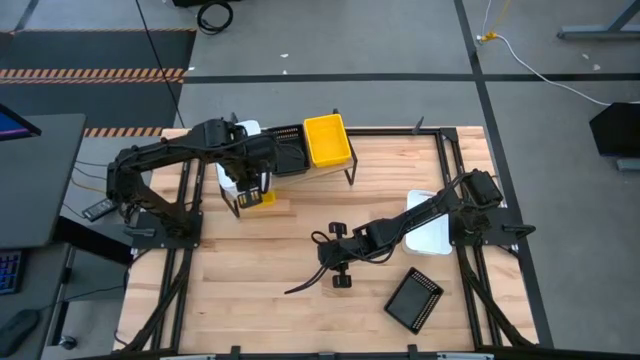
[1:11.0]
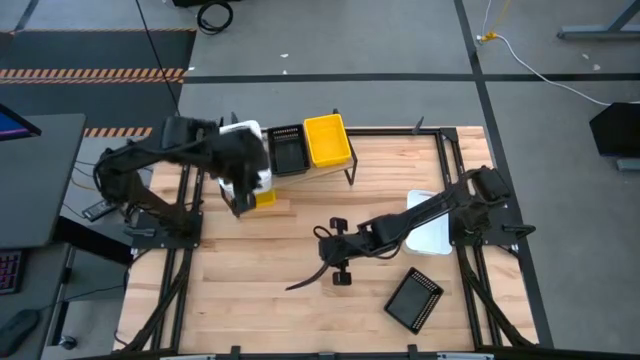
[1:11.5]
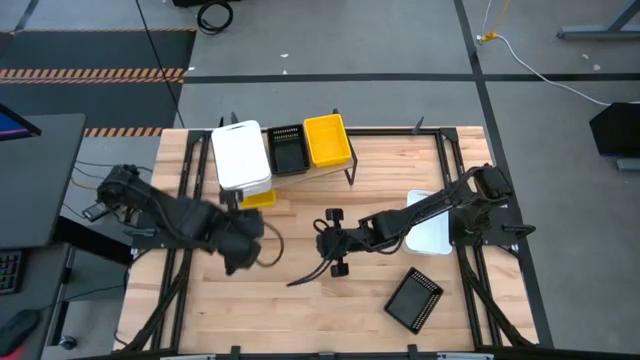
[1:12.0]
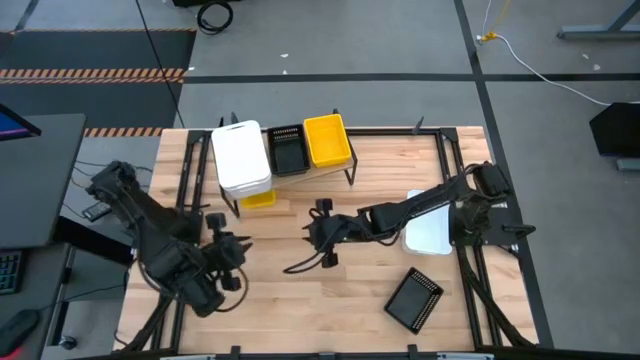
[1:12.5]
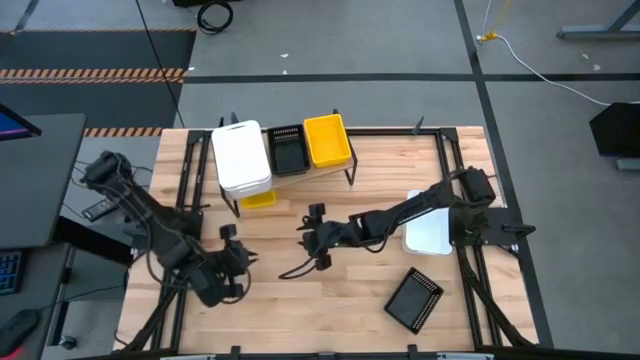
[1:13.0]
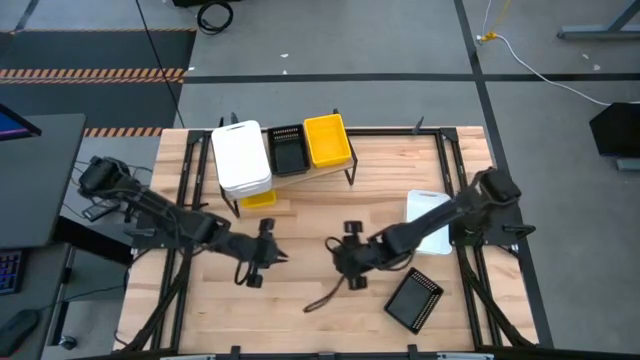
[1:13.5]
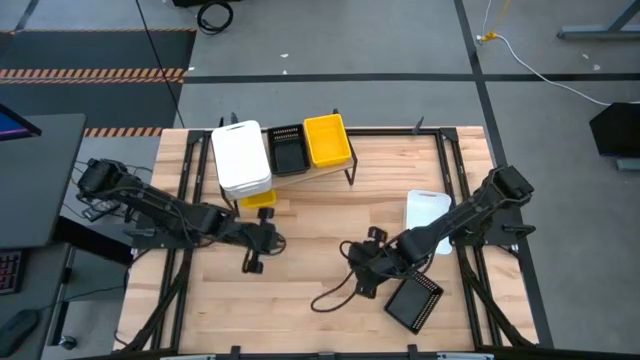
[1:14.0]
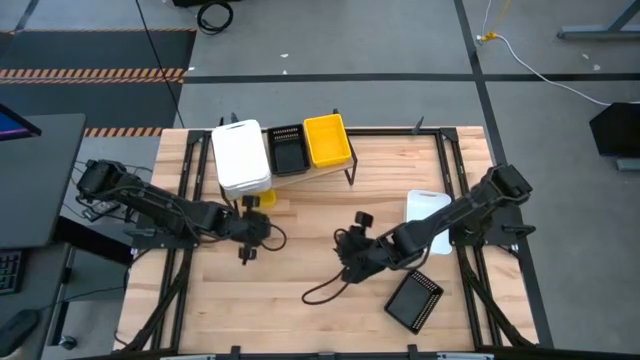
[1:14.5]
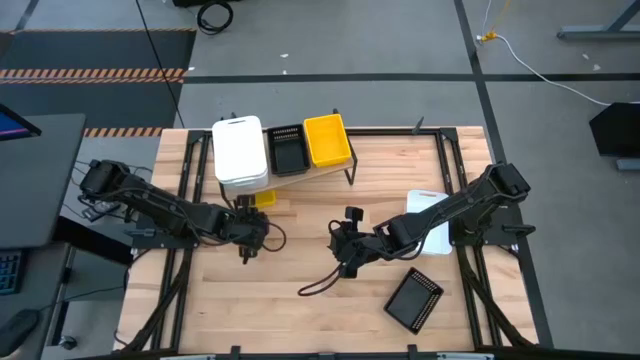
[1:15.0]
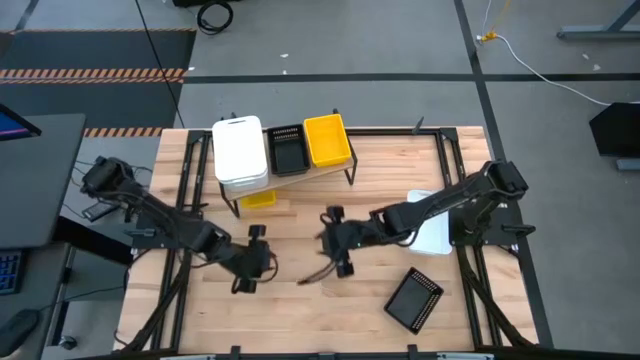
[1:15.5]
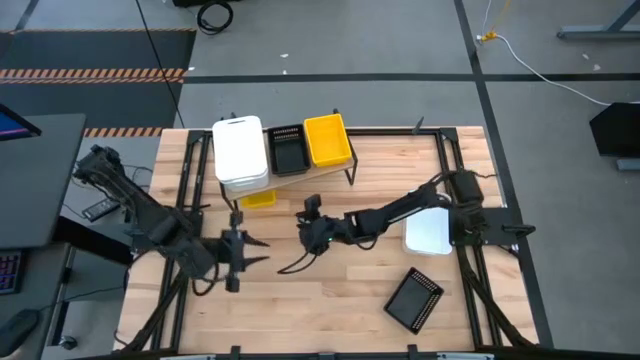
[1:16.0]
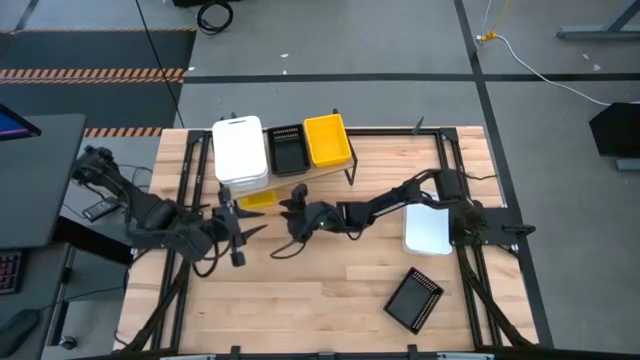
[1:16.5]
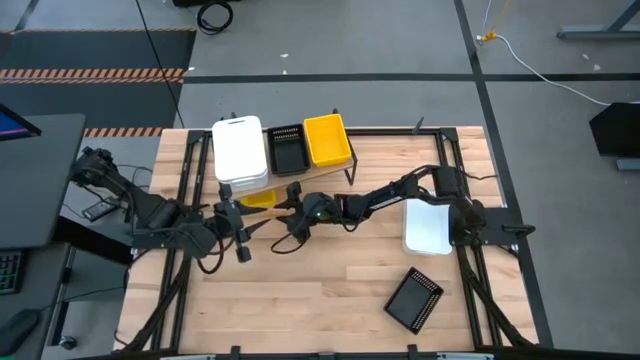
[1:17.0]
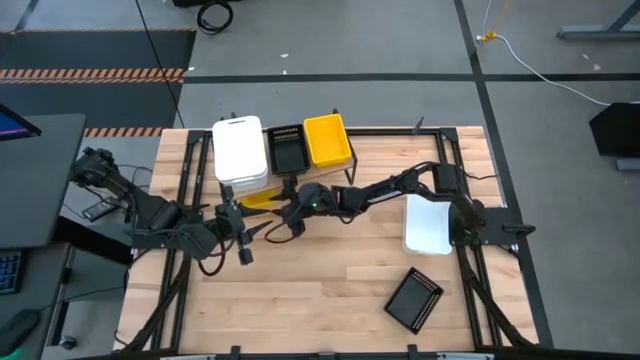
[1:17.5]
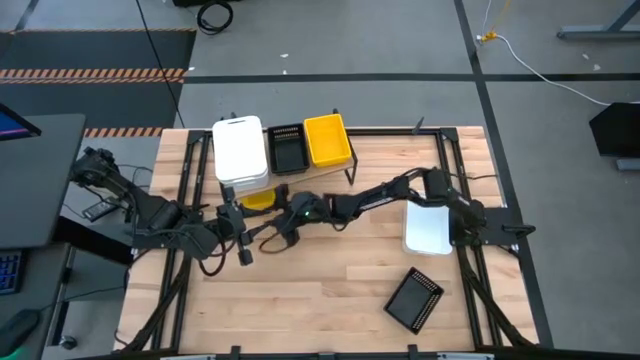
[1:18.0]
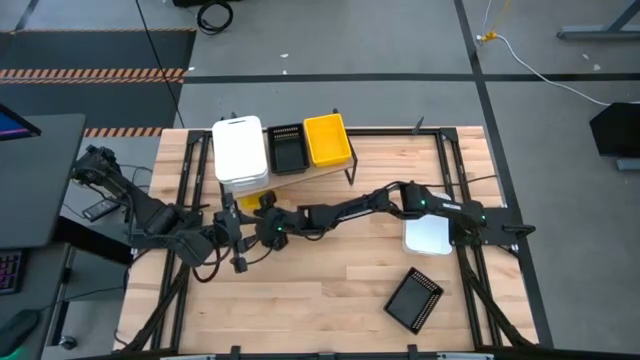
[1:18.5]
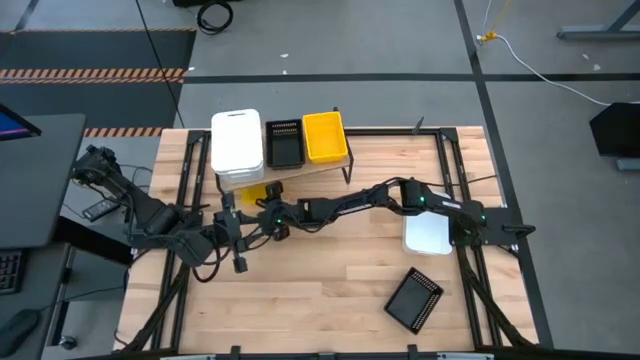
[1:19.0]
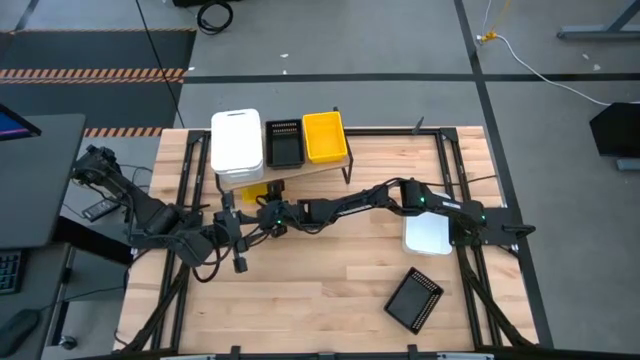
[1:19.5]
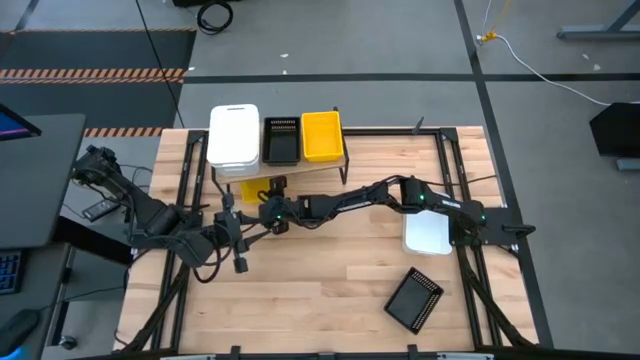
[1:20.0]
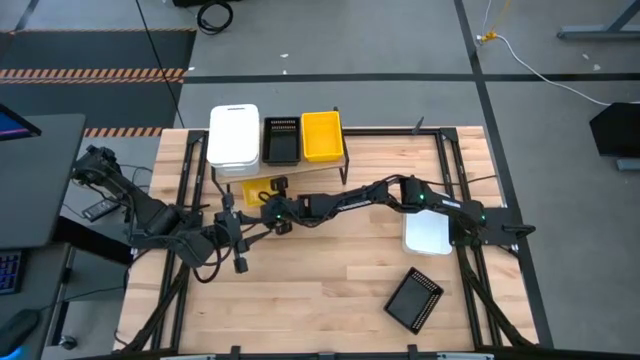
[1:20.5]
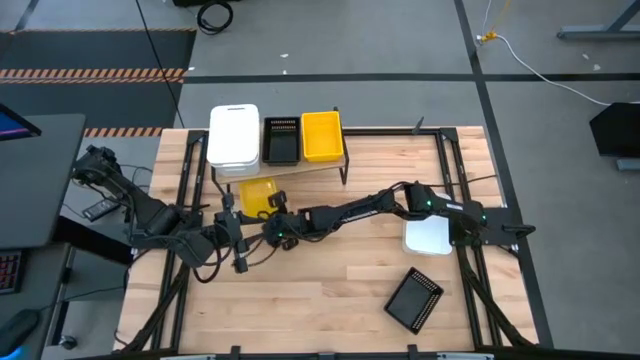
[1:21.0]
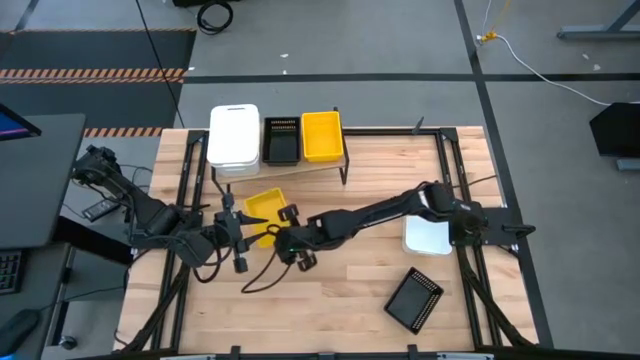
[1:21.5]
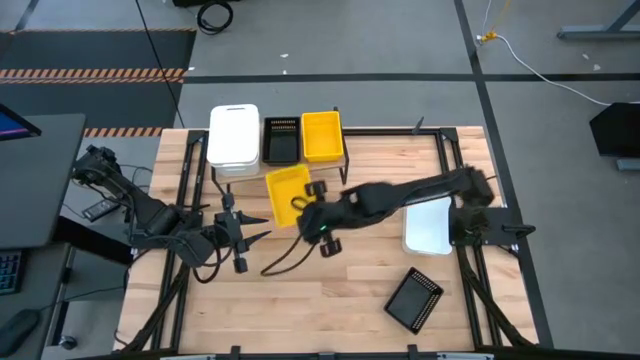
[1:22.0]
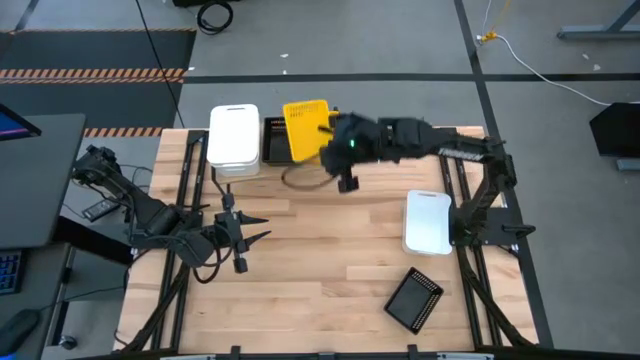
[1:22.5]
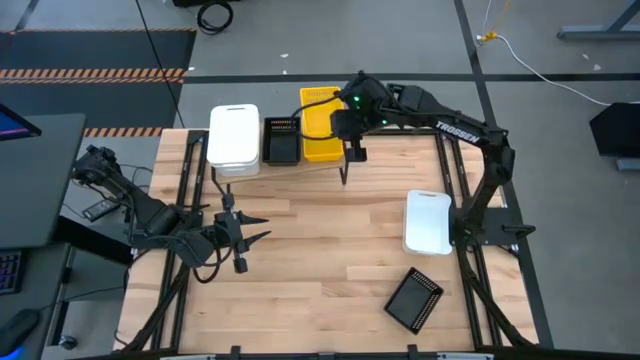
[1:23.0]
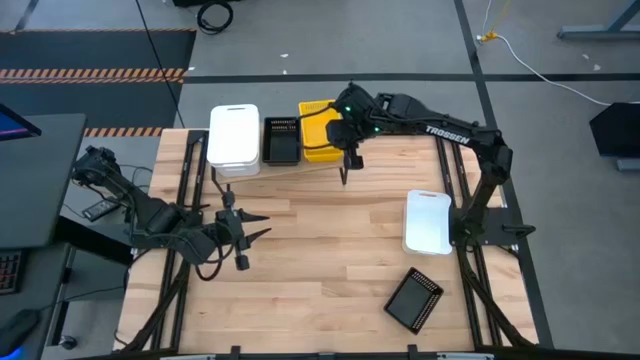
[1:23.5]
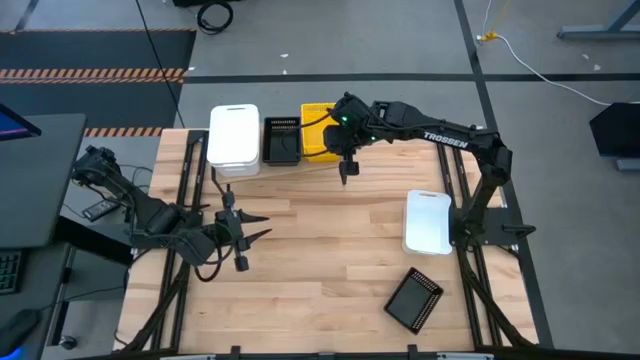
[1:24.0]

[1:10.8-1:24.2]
Task: Stack baskets on shelf by color
Stack the yellow bin on top of the other yellow bin on the shelf

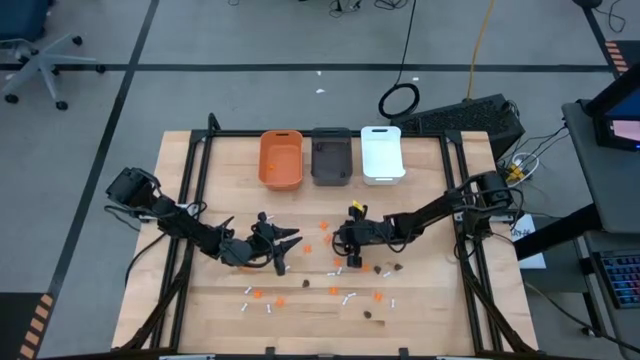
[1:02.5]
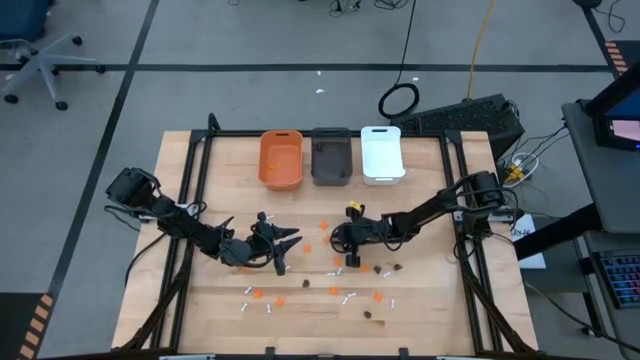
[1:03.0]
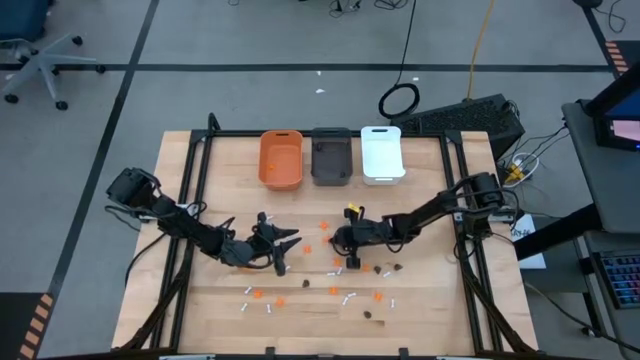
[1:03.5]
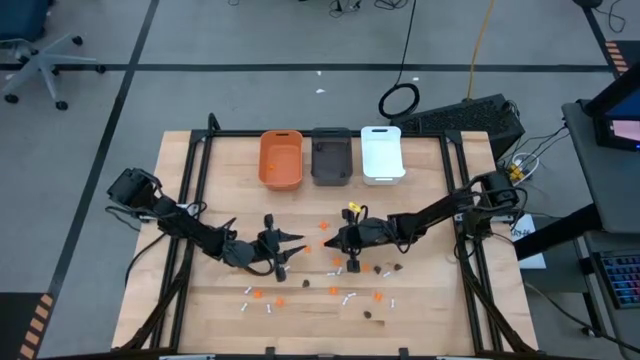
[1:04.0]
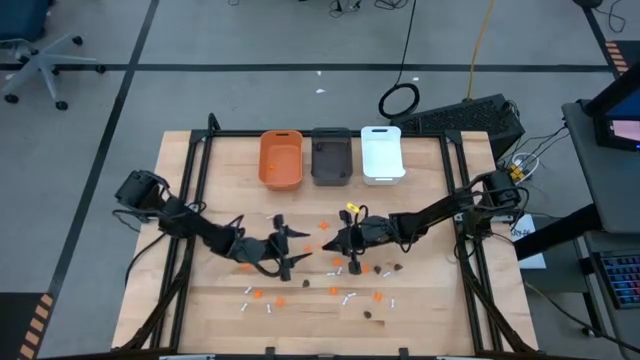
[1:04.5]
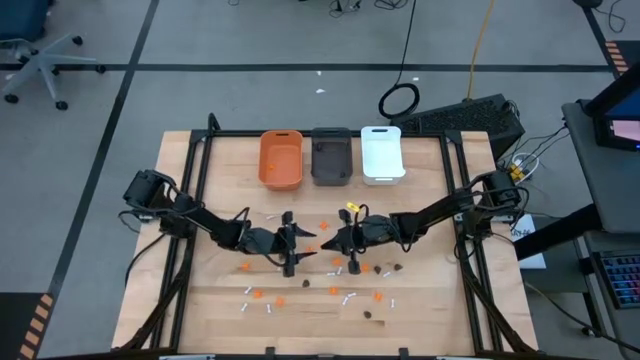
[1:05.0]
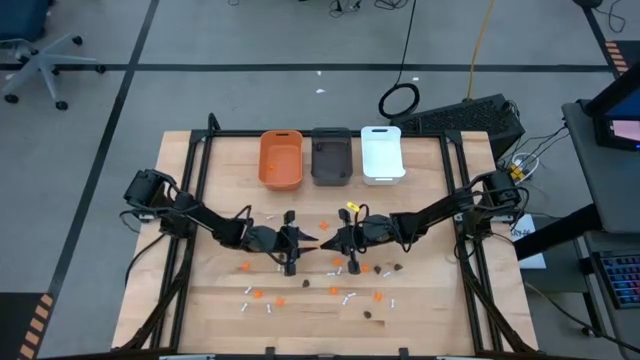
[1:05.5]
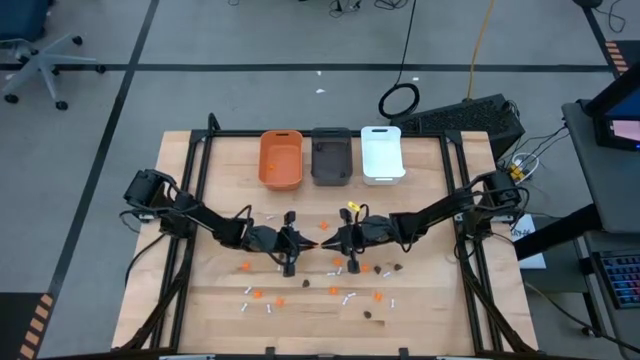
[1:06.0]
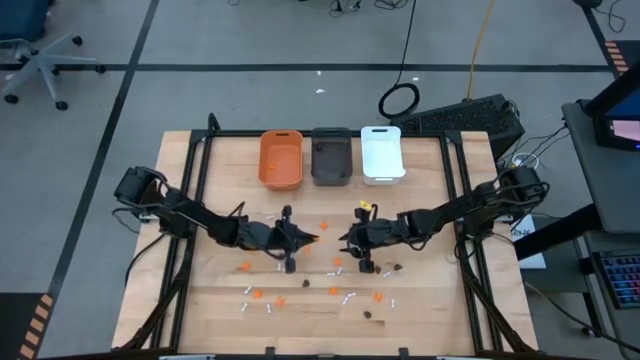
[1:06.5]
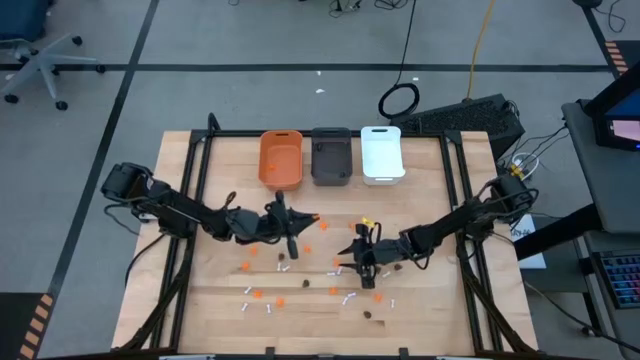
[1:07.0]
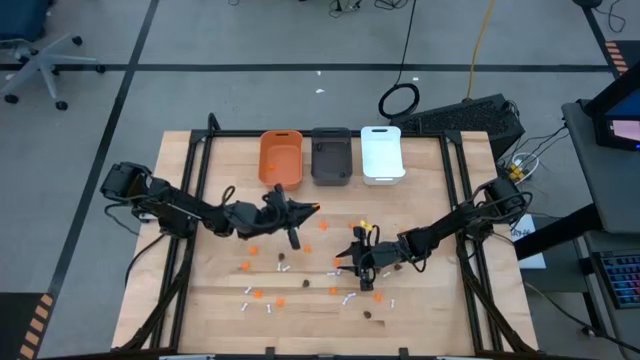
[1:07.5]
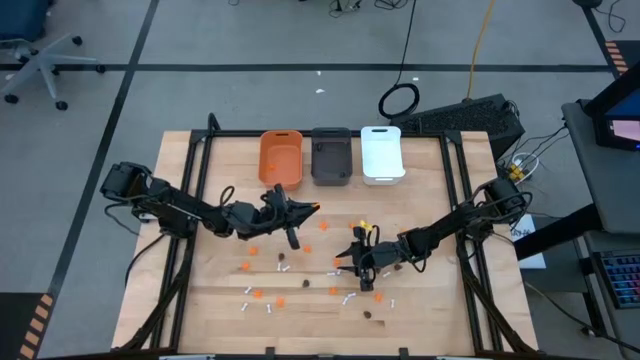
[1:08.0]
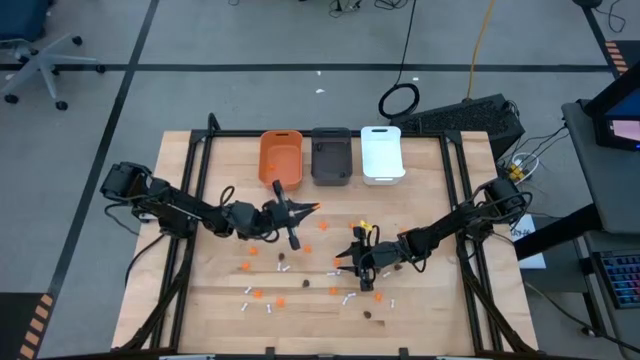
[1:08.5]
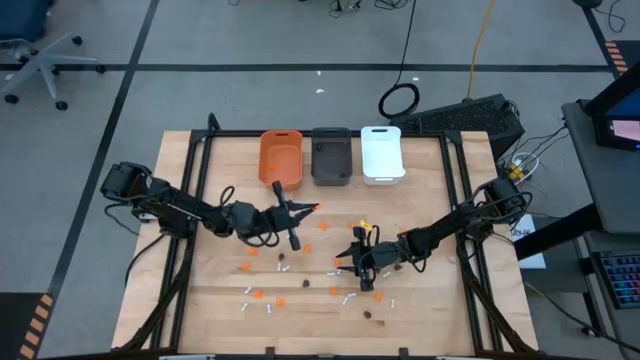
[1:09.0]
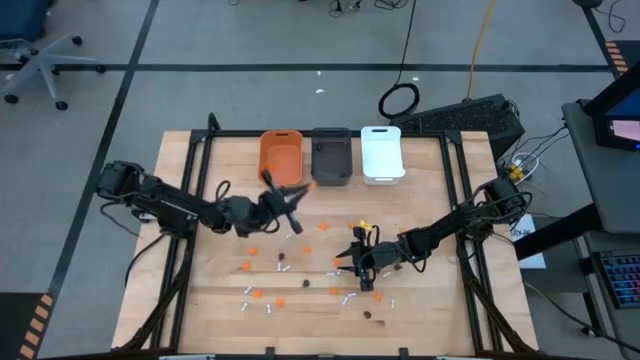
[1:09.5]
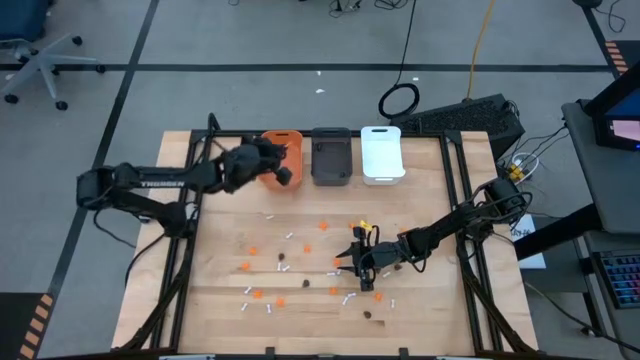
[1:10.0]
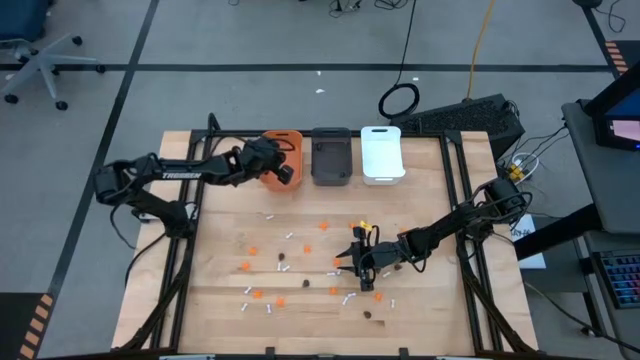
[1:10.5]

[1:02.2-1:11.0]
Task: Sort Halloween decoration
Put the orange spider toy into the orange bin
